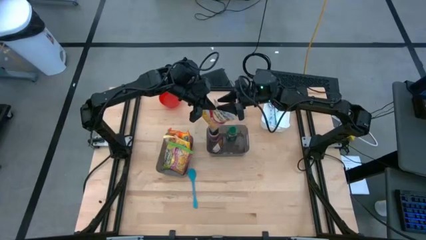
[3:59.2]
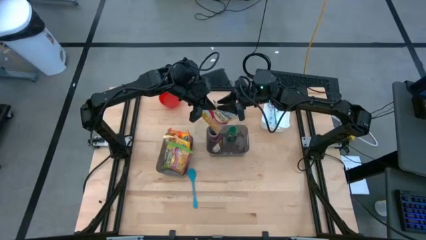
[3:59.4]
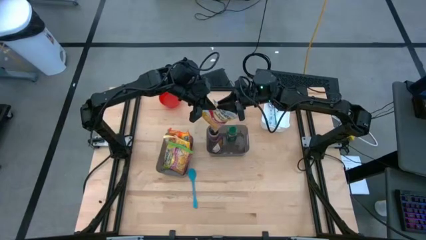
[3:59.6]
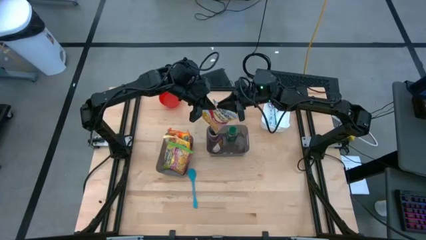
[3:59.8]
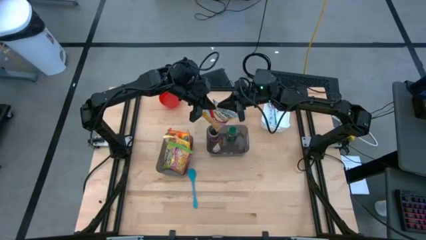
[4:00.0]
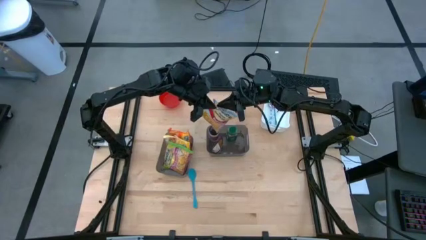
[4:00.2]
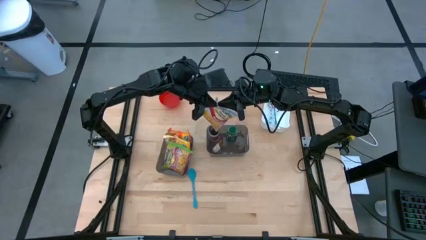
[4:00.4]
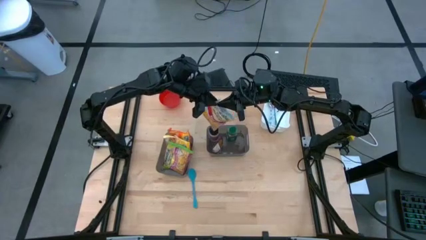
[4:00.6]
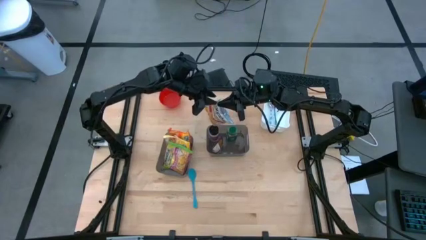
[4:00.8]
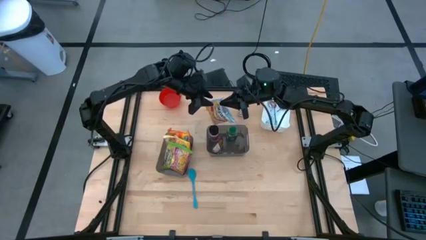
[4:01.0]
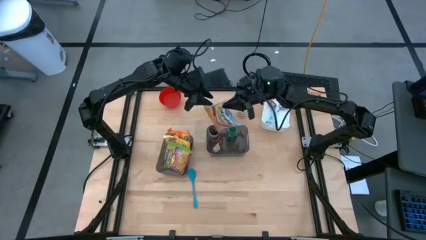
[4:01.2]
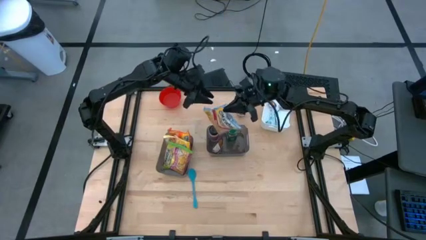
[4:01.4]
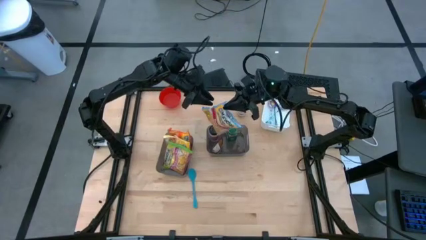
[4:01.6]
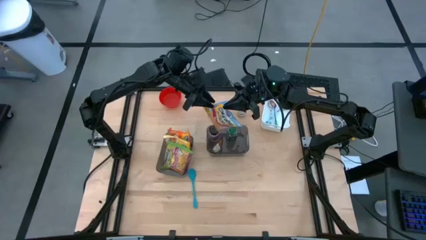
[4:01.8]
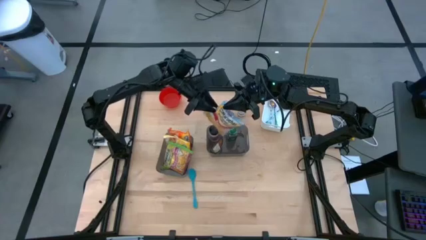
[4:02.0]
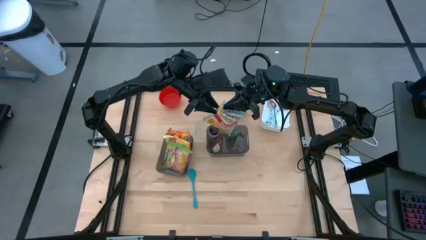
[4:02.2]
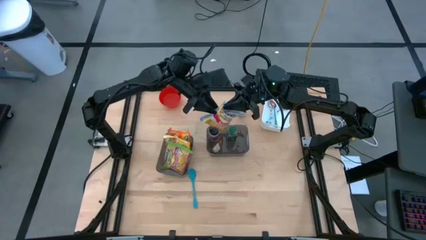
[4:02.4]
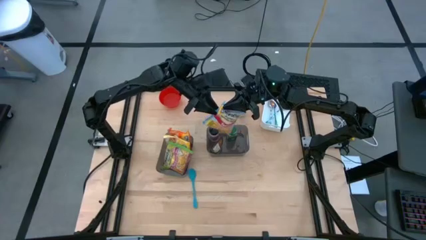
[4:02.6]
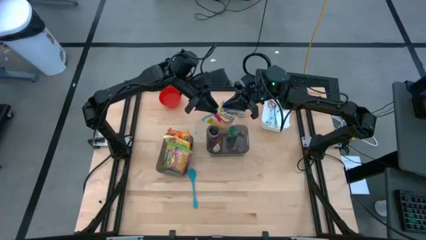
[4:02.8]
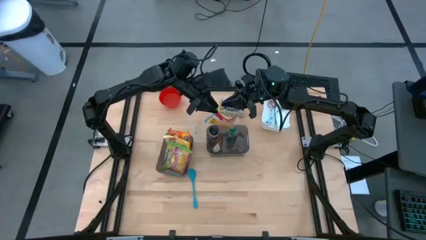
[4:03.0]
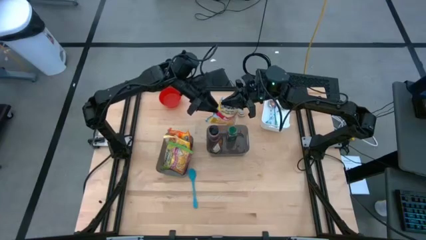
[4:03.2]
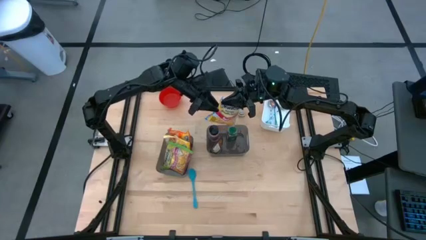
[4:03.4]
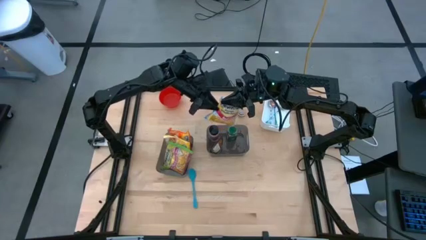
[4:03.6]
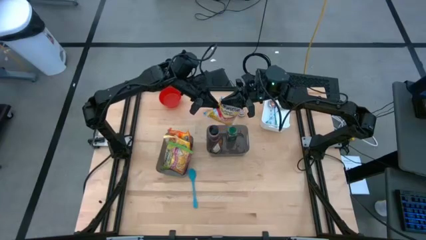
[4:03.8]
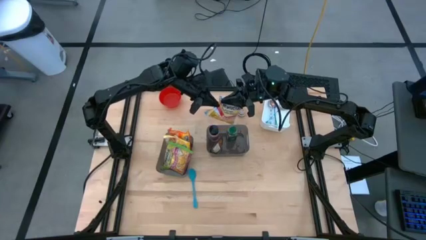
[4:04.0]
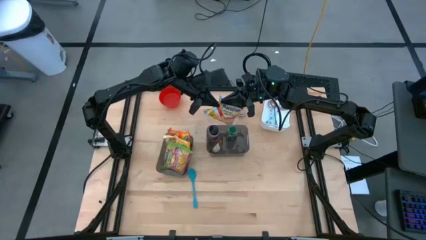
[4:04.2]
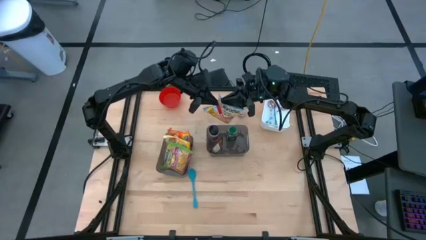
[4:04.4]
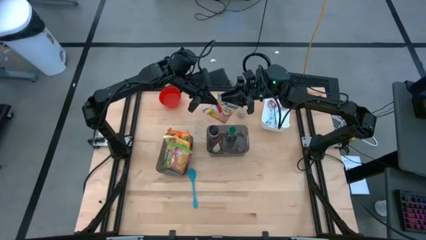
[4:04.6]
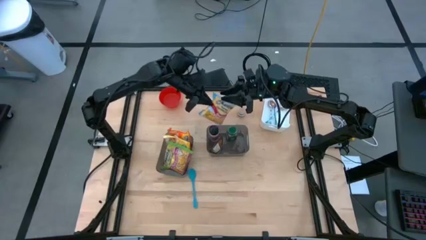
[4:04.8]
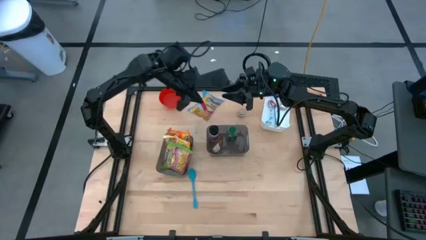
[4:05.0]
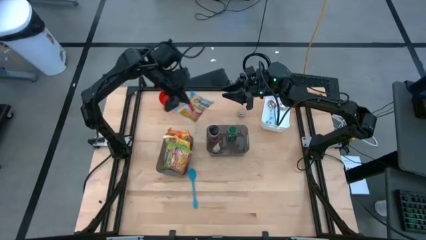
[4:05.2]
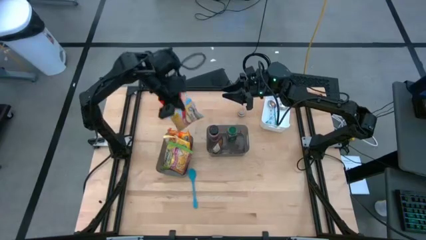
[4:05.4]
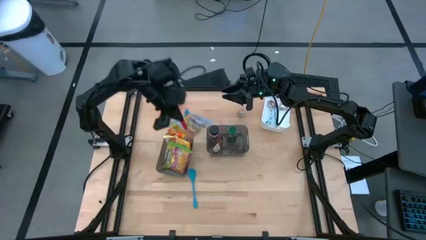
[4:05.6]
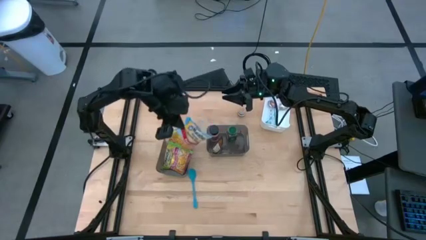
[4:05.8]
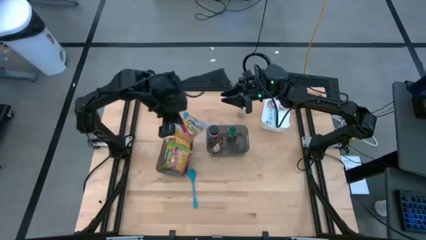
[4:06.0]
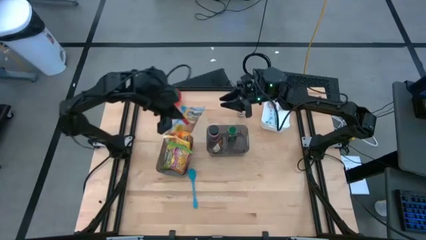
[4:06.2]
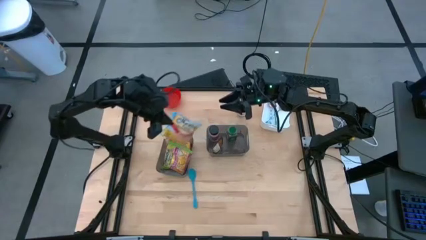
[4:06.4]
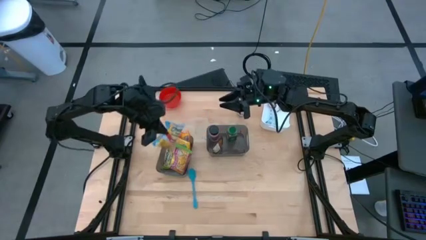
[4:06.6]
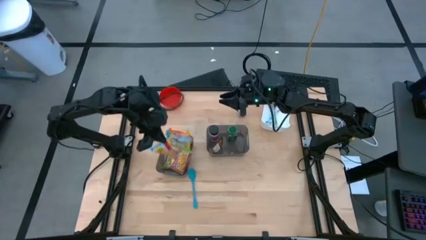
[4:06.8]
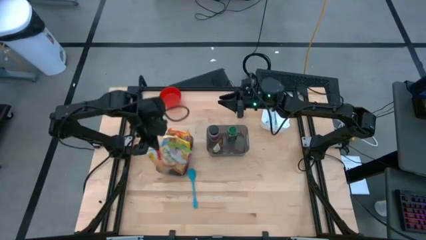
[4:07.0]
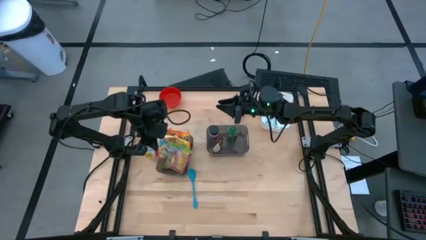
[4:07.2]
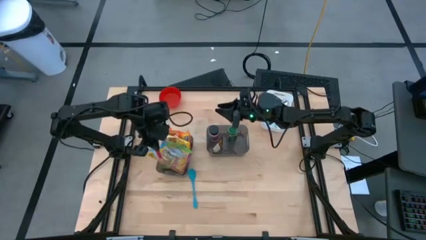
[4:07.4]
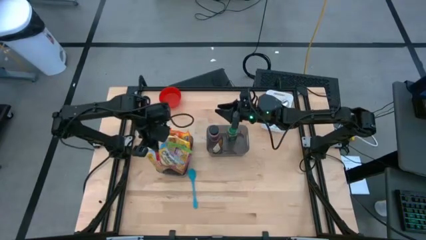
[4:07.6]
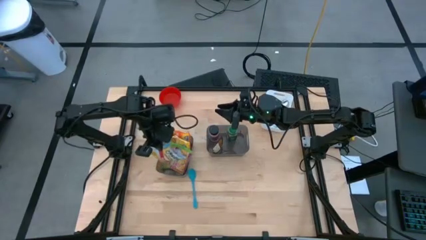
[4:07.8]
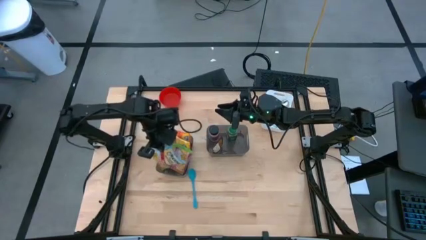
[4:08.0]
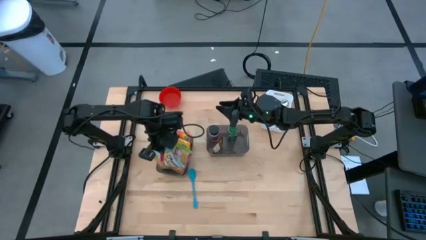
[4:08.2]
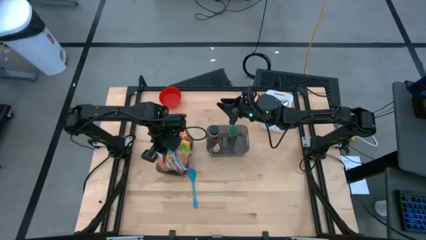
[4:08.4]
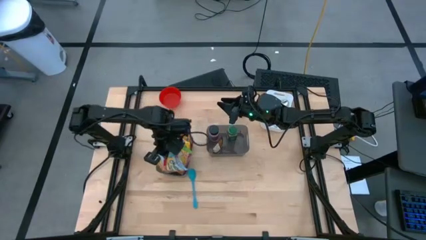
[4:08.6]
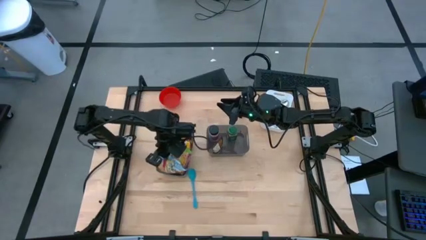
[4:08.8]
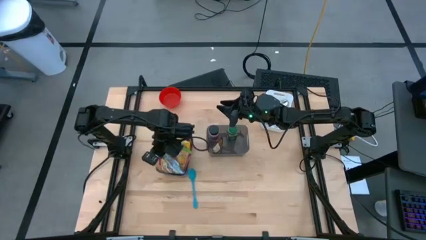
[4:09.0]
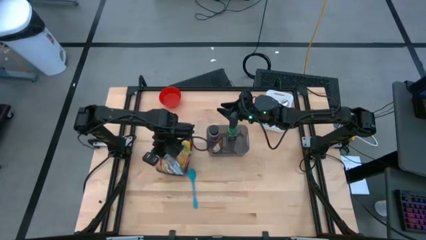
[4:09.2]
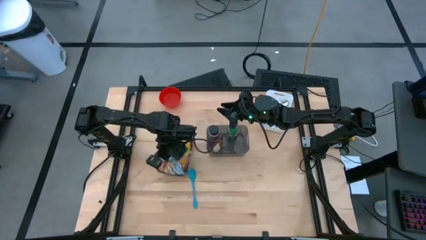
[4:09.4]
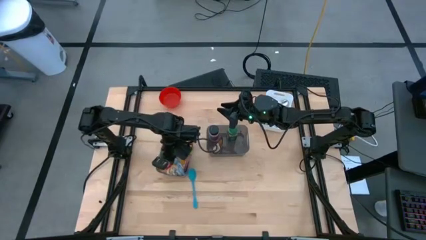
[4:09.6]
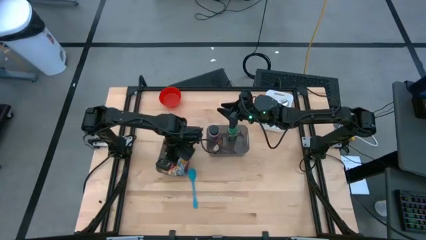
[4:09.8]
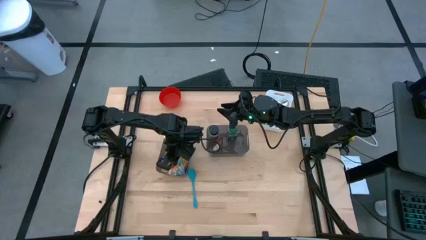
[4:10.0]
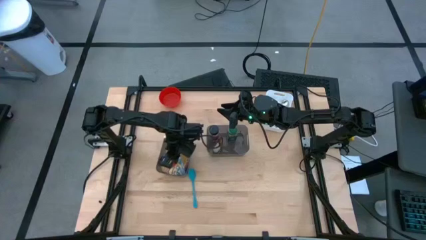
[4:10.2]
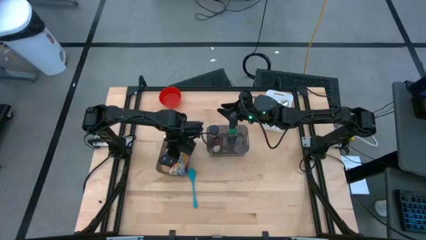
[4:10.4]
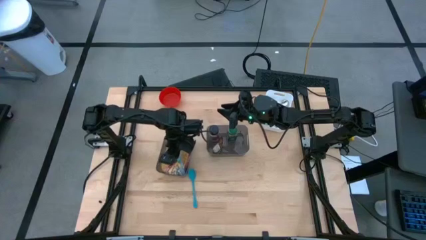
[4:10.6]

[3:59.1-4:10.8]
Task: Pick & Place Food Item
Put the blue noodle pack into the left black bin
